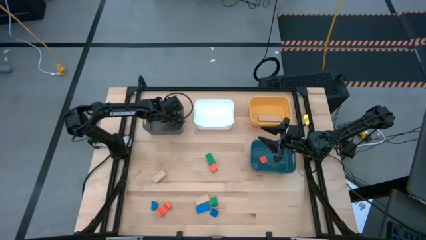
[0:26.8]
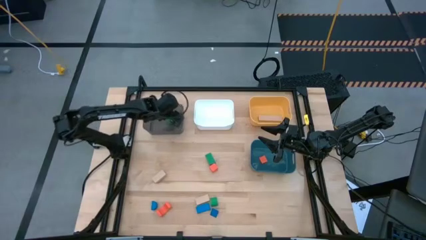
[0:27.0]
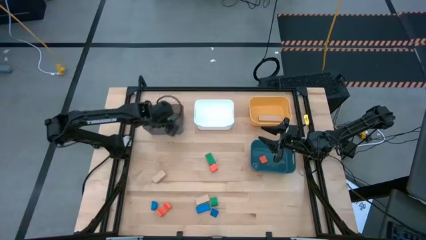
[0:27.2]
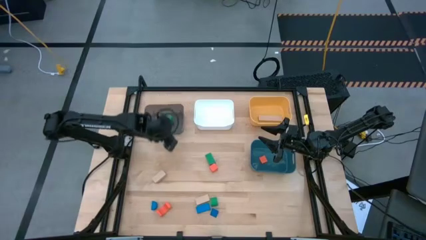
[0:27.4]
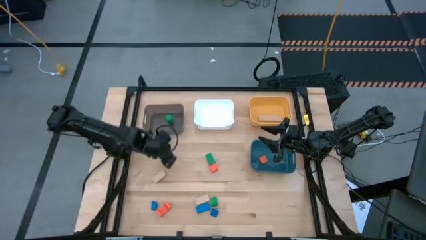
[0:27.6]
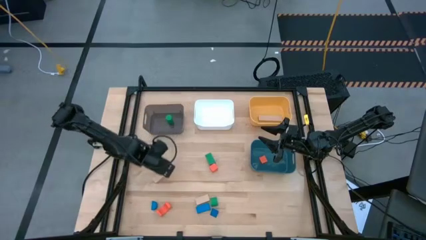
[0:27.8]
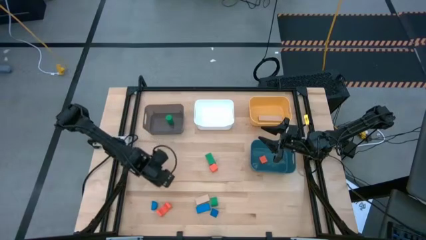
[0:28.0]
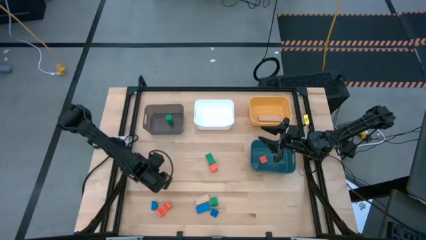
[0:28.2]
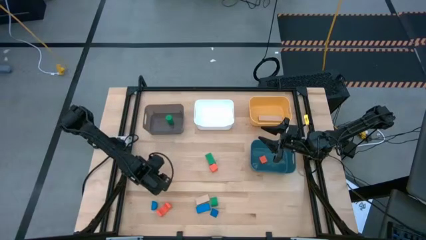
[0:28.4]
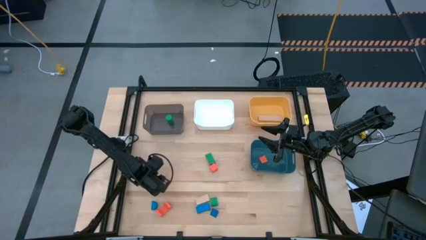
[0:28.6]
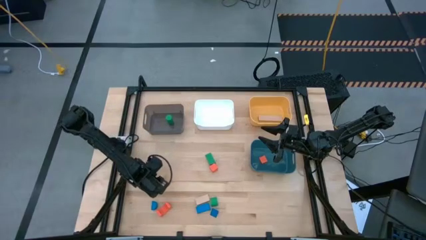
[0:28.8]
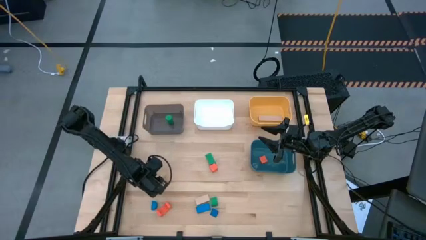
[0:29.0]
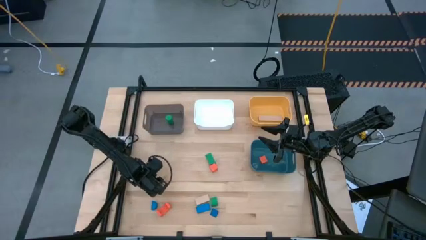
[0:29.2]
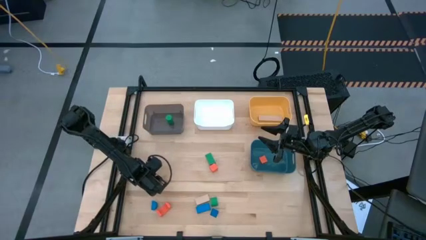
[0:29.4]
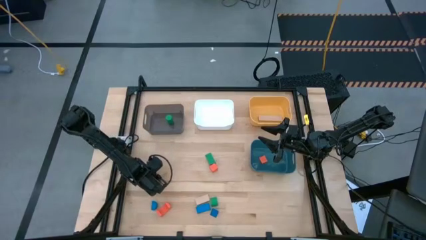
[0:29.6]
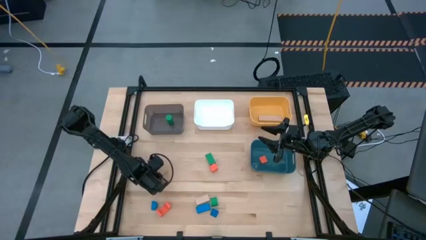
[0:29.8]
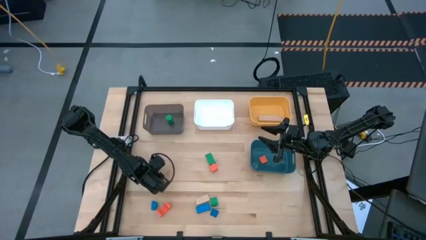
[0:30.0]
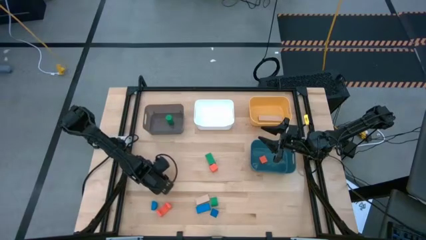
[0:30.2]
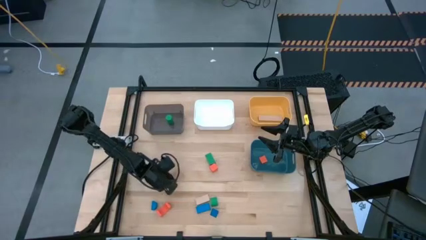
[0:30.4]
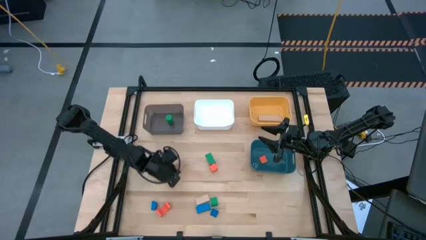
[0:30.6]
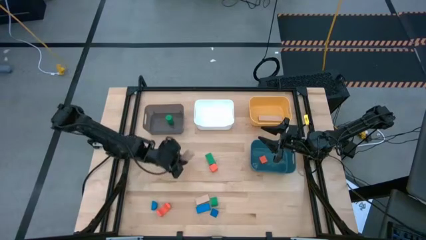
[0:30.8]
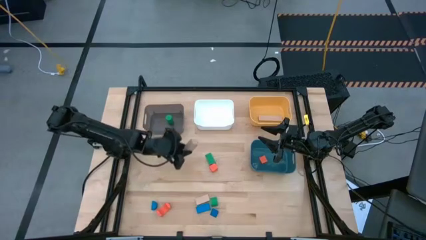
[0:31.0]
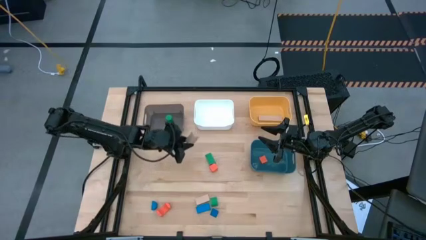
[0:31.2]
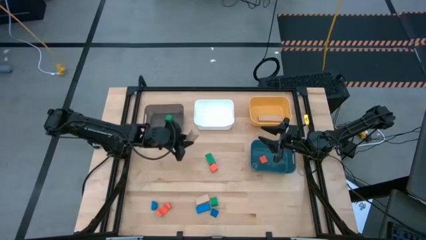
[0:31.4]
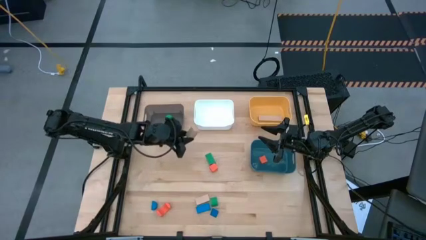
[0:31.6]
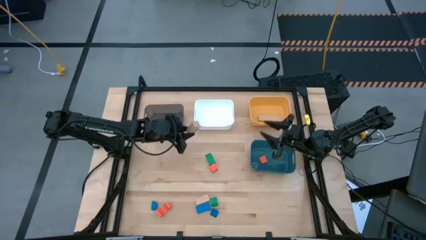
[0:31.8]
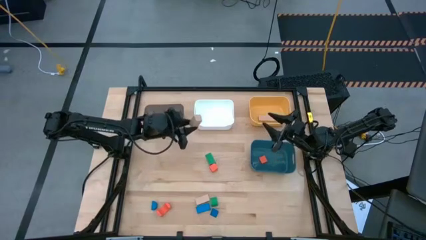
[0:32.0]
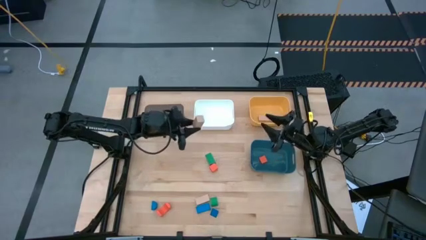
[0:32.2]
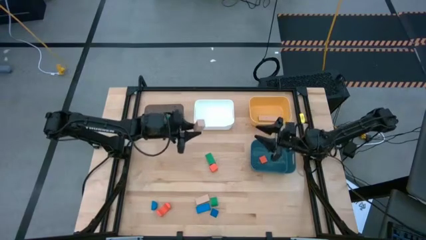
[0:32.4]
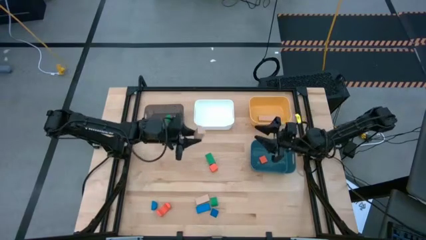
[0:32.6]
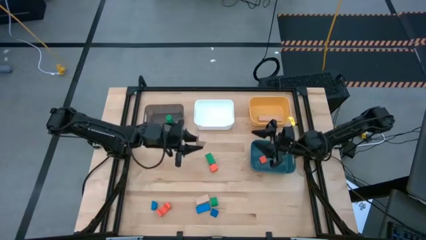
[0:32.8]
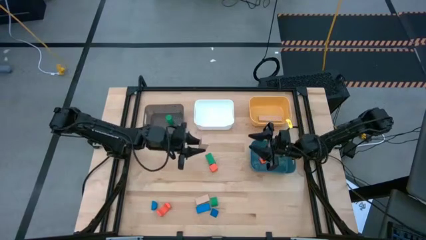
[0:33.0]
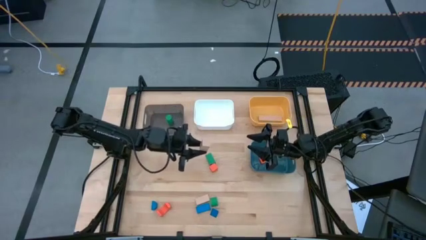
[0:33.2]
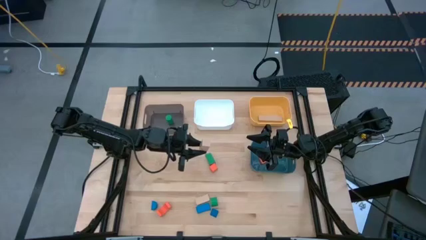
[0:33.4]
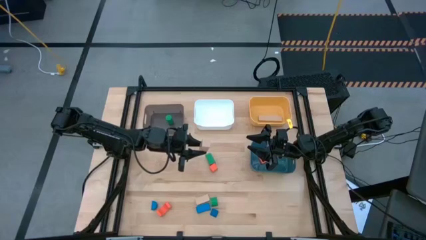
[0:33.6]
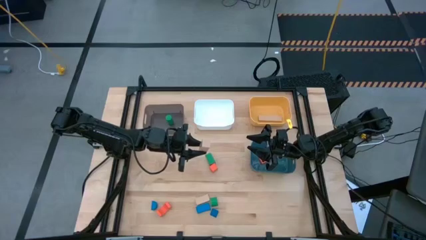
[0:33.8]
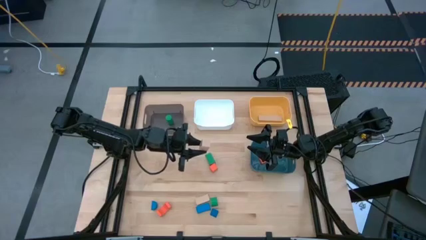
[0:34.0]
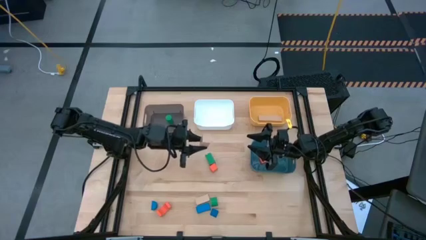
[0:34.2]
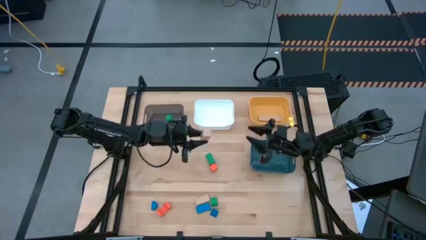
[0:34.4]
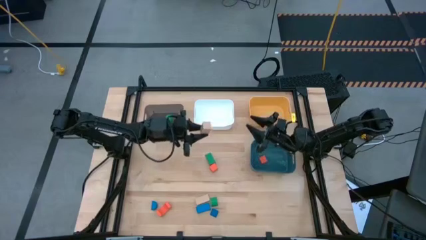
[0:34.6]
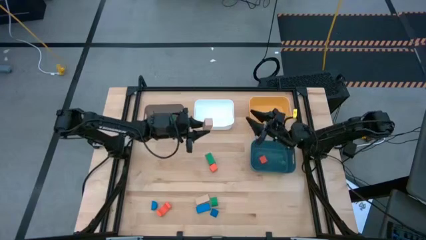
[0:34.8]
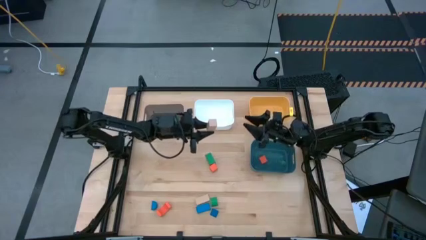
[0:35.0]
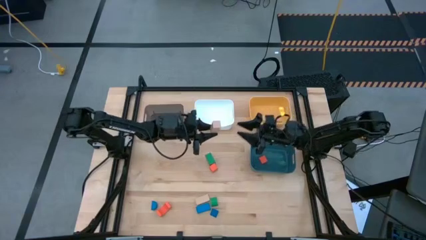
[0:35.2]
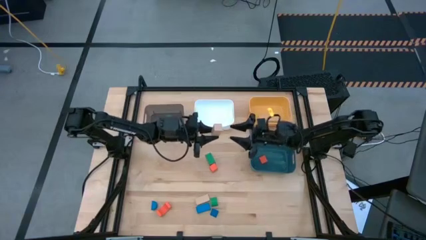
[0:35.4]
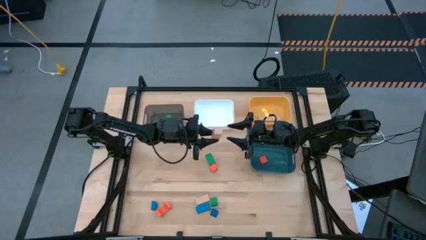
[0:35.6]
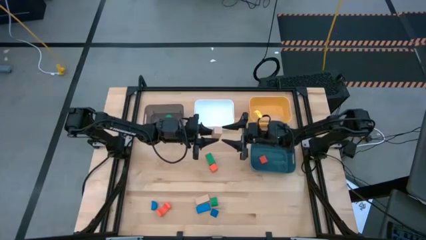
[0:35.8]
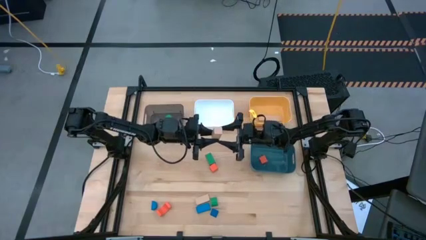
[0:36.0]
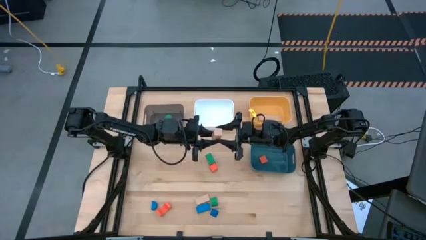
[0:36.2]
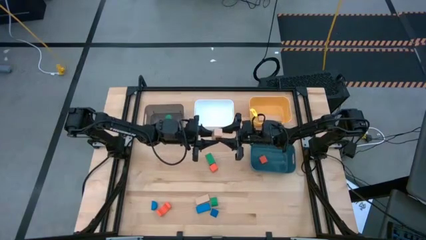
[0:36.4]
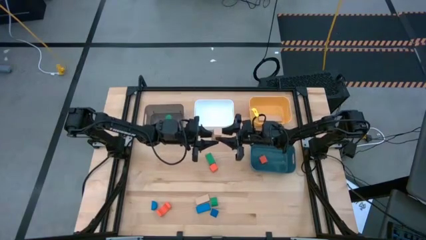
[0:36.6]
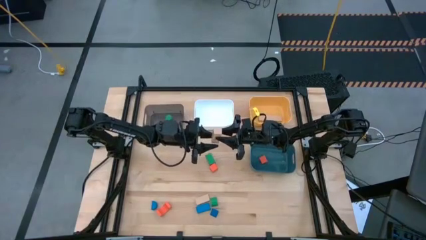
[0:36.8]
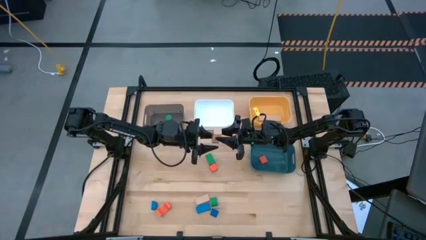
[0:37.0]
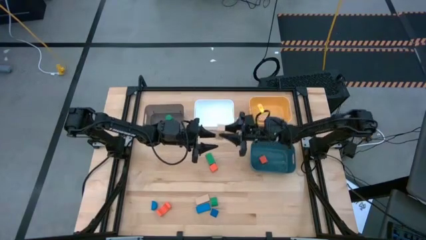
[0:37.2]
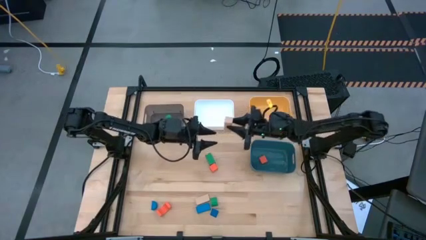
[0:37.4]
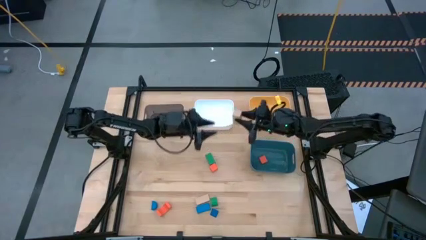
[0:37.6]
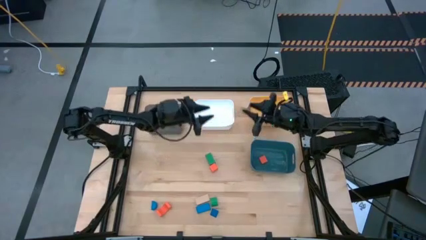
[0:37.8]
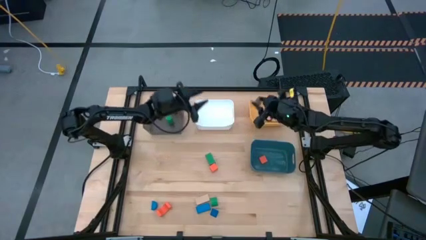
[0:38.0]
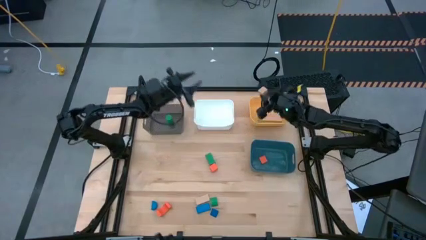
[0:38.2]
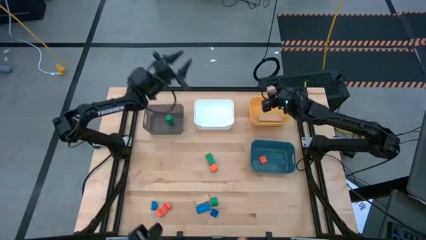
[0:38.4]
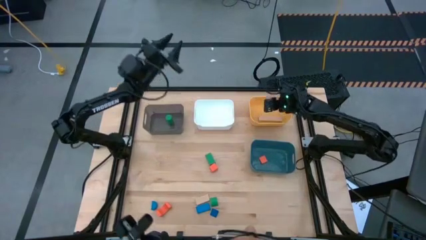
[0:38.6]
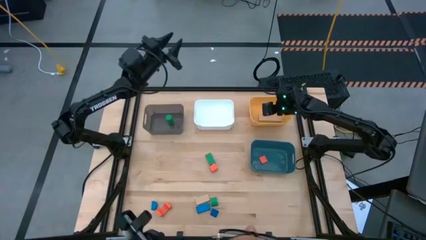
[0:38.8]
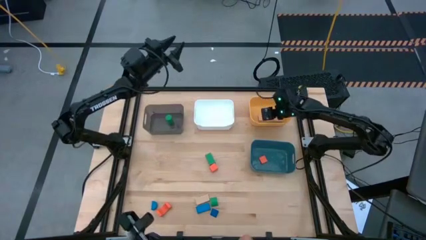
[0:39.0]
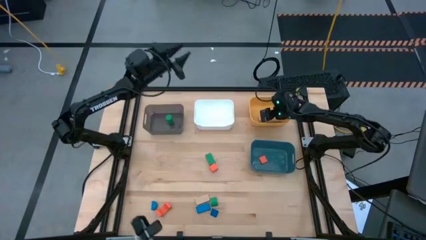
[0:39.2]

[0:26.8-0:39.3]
Task: Sort & place blocks by color
Put the top brown block into the yellow bin
